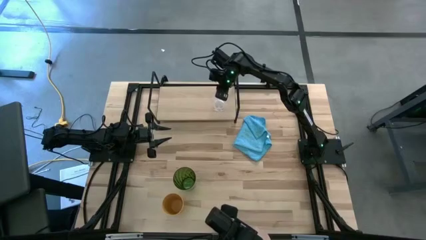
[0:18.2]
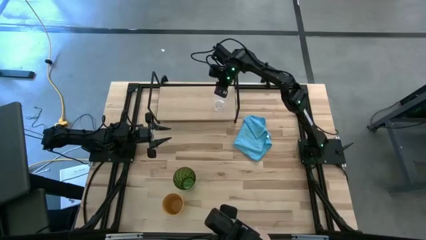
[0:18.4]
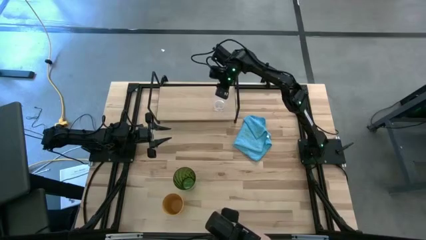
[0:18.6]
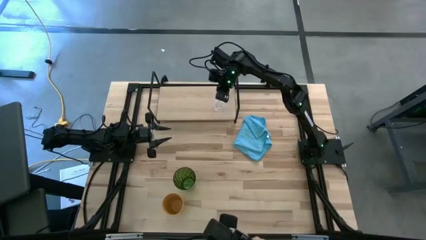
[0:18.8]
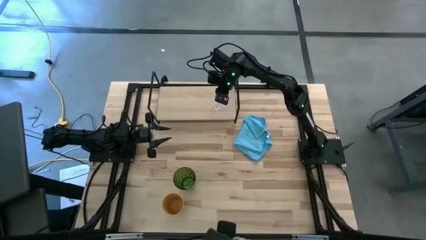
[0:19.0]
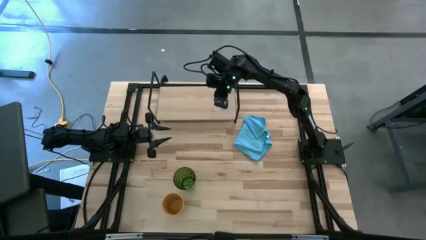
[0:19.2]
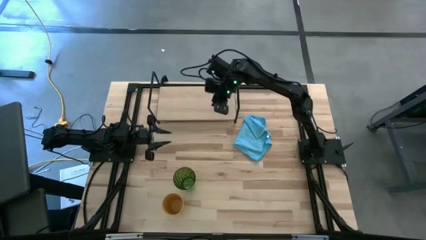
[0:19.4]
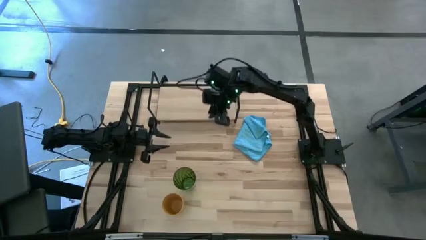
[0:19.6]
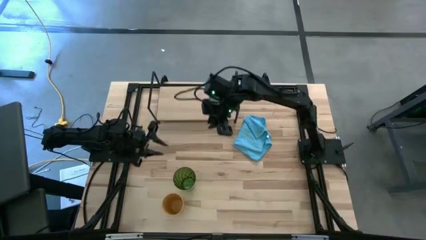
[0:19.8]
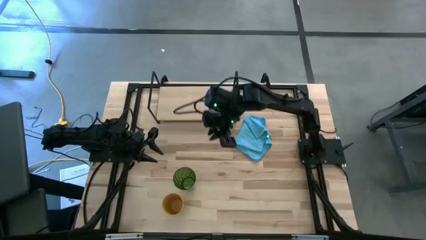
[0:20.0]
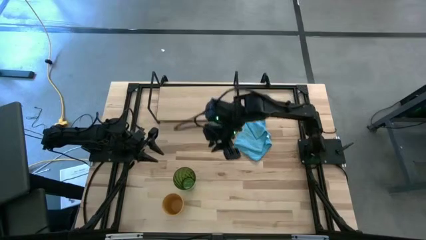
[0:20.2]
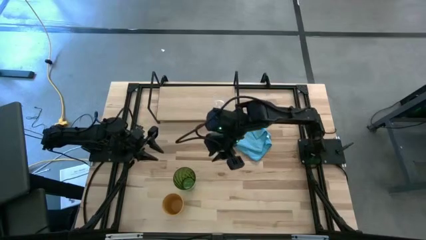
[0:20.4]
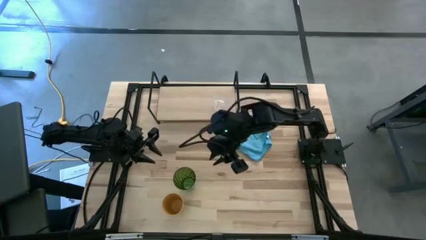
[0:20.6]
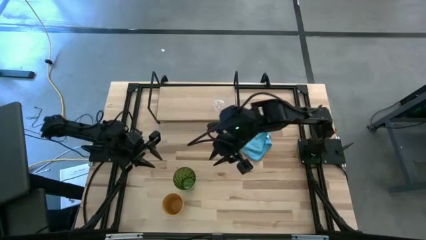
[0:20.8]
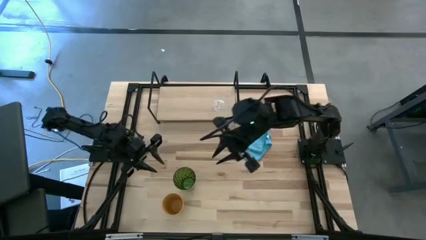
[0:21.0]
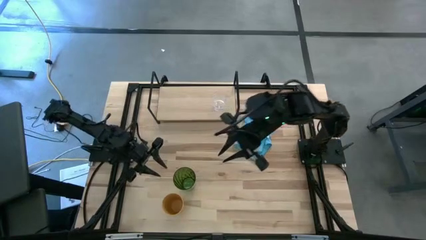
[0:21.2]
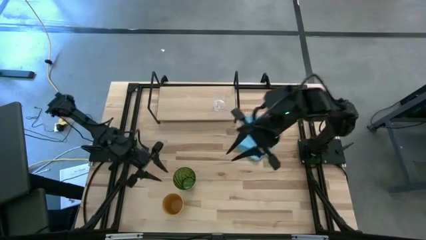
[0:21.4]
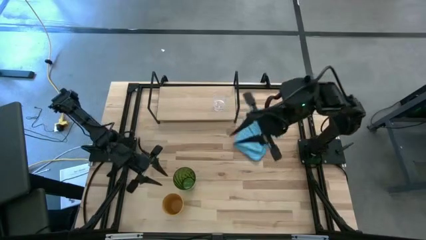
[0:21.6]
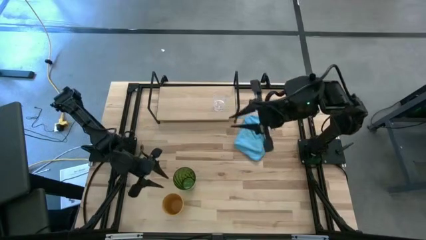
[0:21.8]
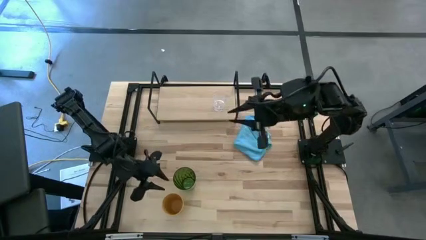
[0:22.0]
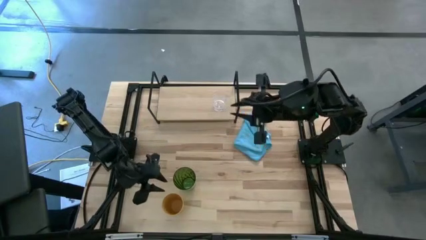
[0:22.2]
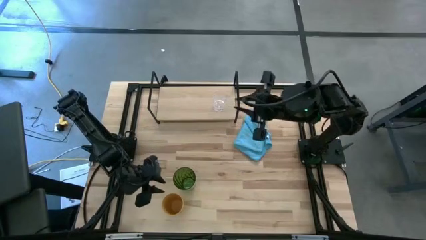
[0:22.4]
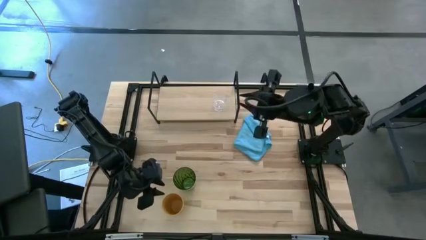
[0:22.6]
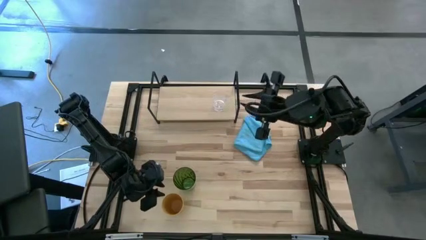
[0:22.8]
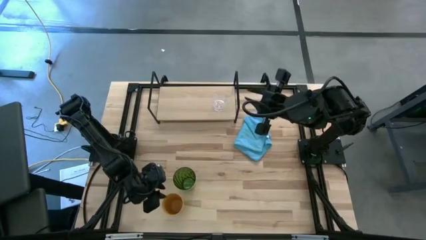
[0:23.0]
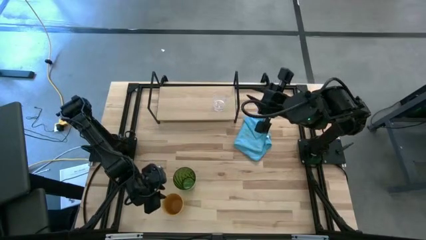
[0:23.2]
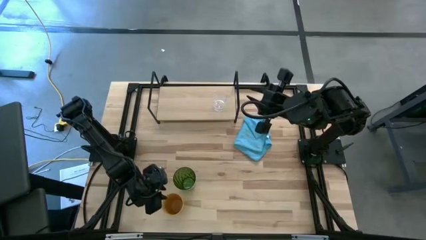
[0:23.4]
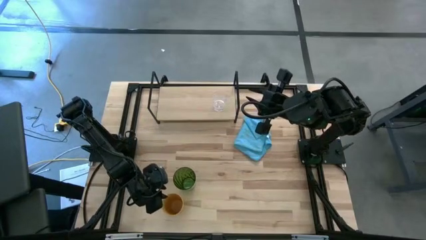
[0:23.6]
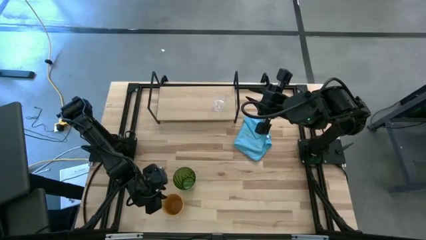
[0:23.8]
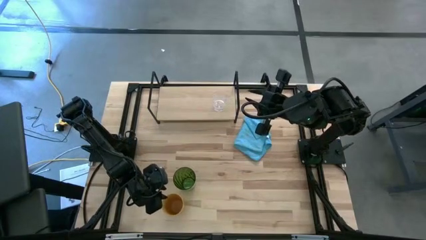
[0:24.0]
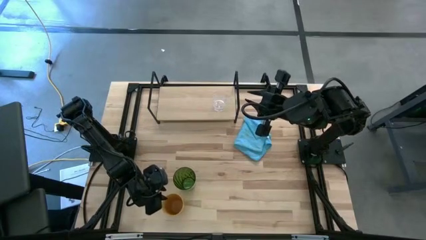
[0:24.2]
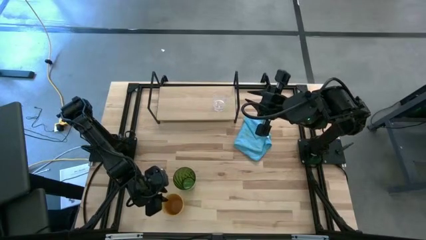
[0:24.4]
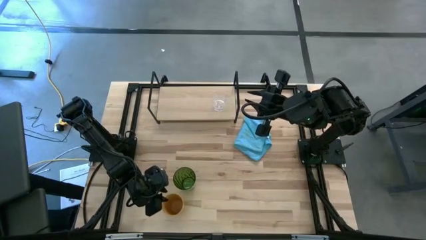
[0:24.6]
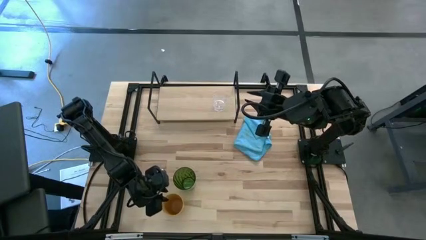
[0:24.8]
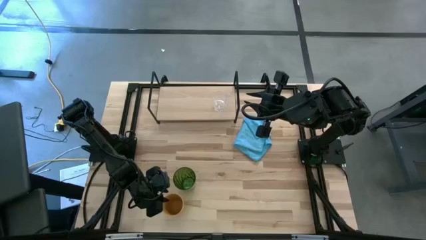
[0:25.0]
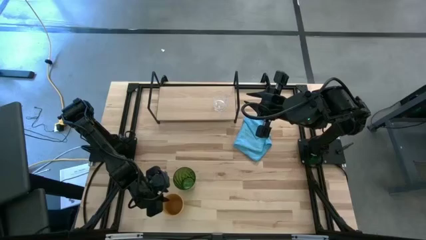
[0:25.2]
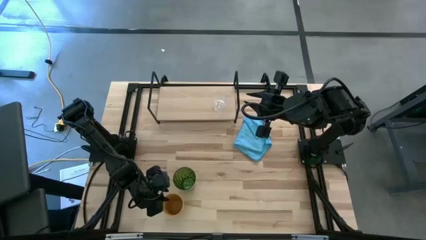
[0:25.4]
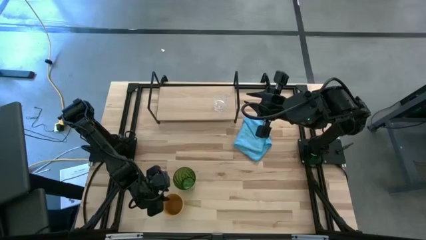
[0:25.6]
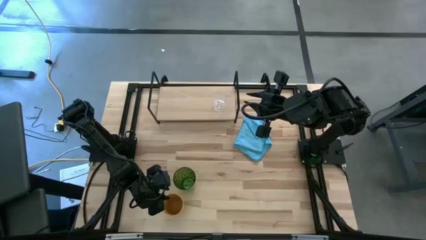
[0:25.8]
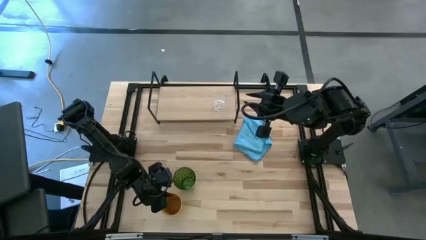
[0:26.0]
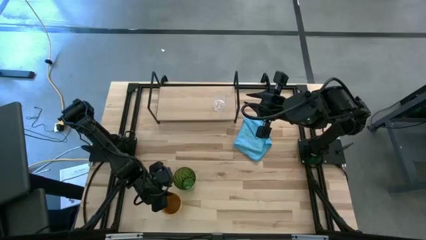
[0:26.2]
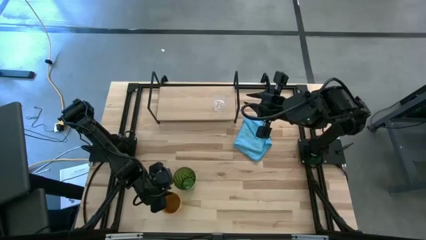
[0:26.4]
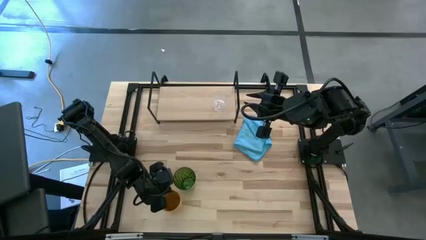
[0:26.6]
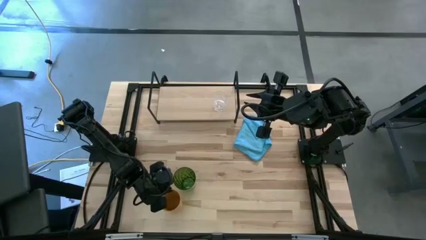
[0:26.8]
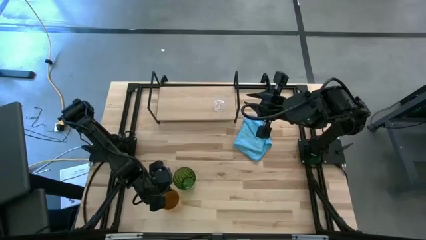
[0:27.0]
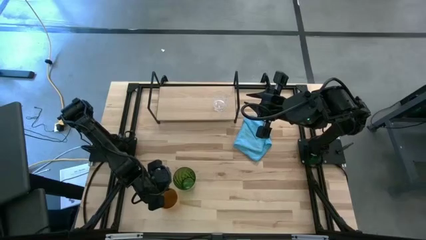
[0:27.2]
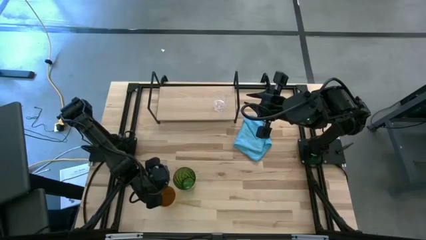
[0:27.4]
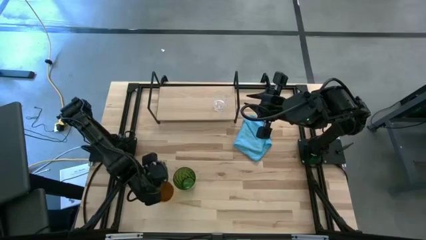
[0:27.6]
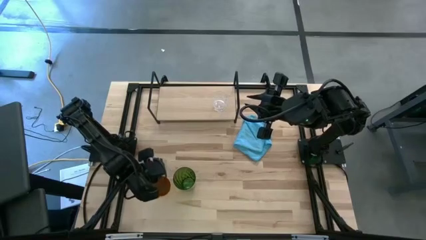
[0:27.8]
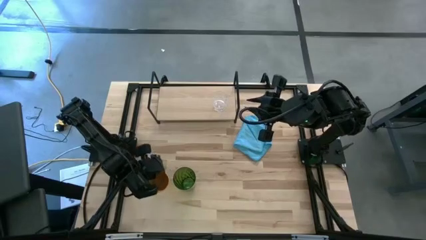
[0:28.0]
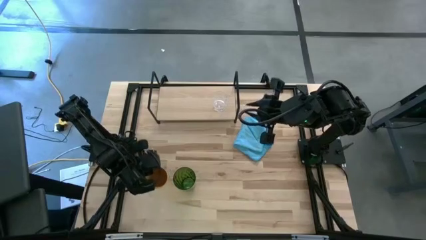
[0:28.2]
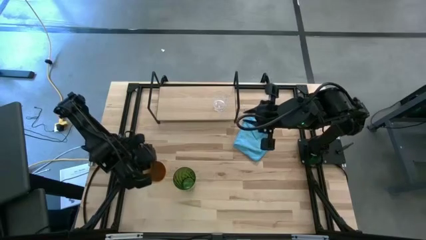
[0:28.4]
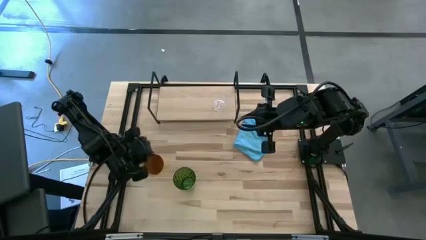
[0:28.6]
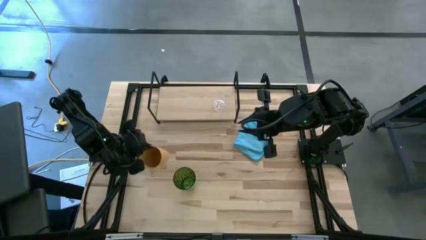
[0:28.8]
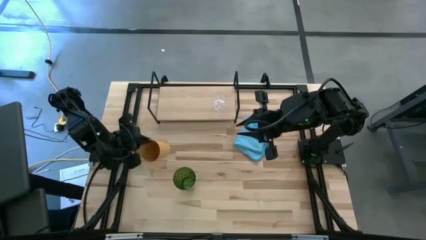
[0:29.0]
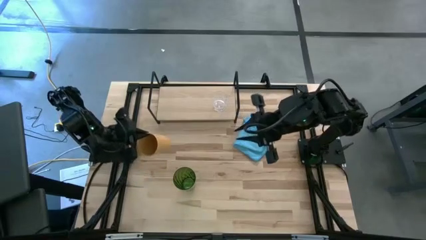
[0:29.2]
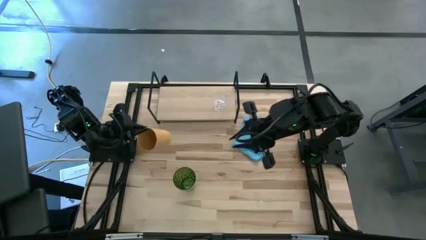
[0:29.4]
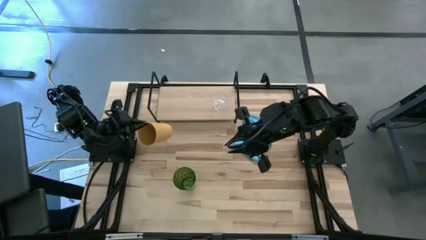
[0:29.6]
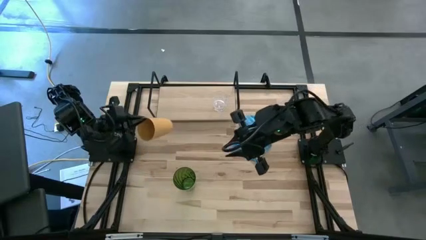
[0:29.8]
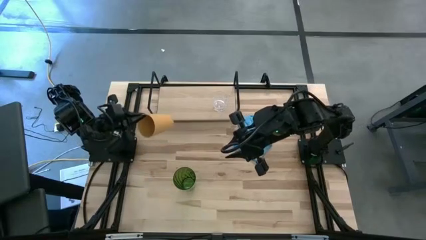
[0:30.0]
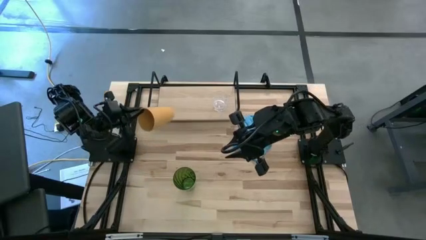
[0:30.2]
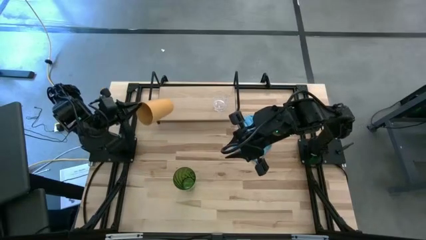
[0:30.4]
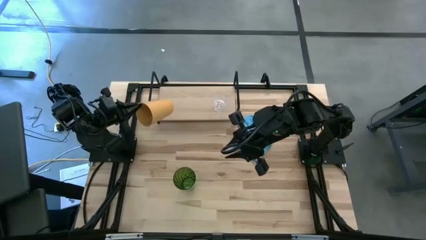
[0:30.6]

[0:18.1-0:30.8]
Task: Stack small to large cups/mugs on shelf
Put the yellow cup on the shelf

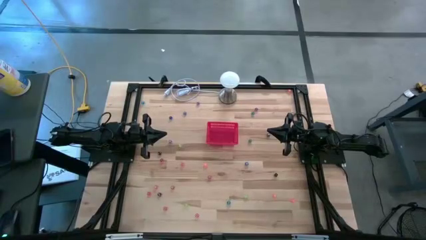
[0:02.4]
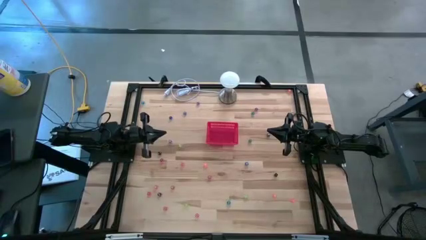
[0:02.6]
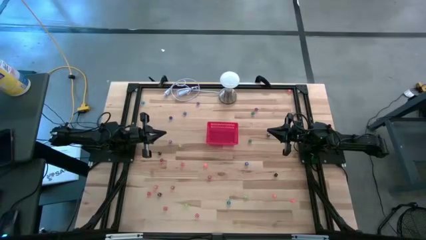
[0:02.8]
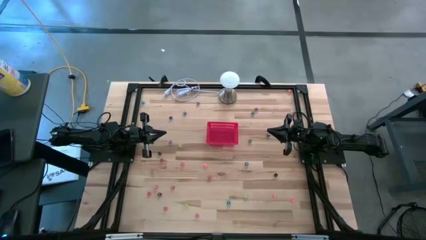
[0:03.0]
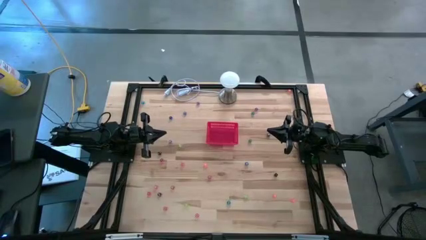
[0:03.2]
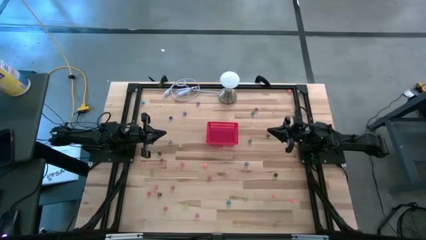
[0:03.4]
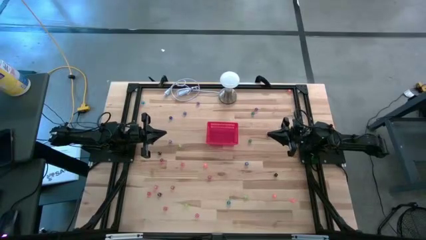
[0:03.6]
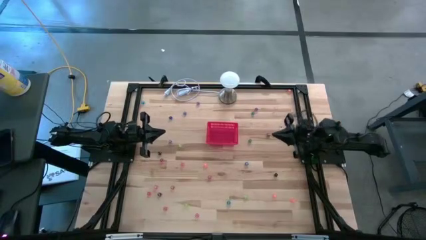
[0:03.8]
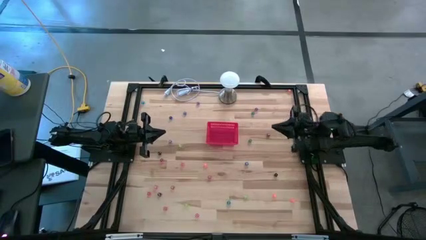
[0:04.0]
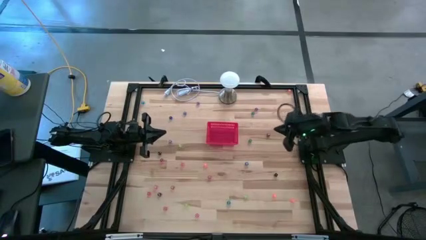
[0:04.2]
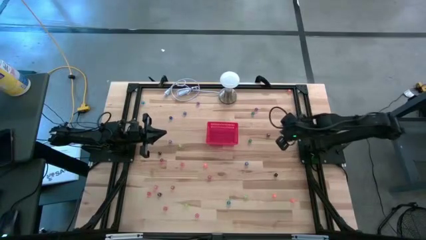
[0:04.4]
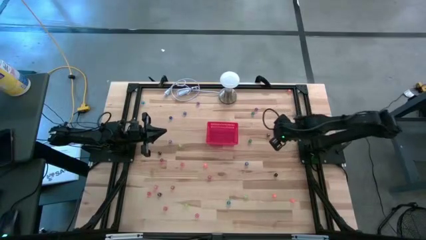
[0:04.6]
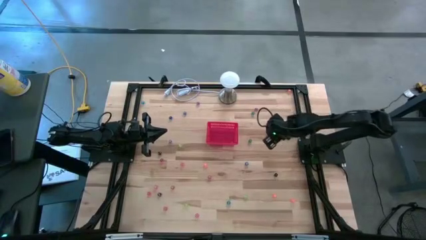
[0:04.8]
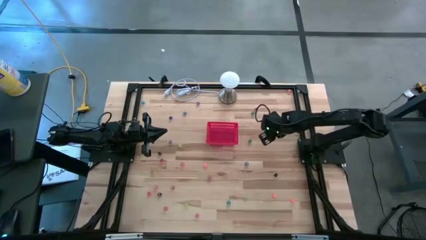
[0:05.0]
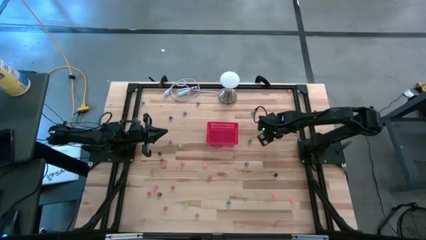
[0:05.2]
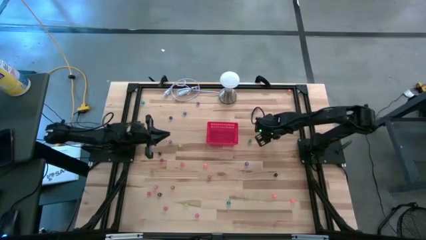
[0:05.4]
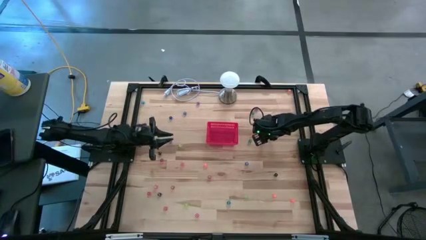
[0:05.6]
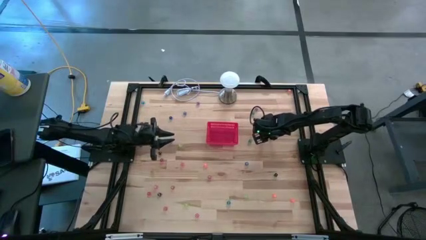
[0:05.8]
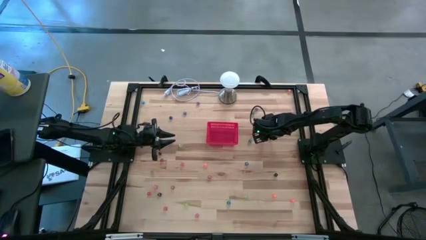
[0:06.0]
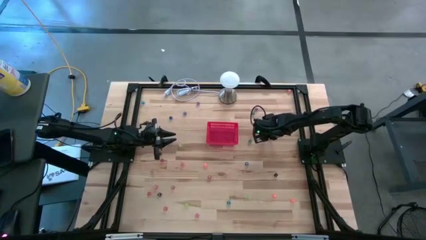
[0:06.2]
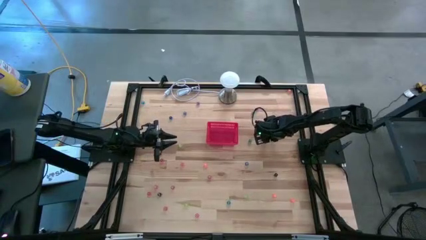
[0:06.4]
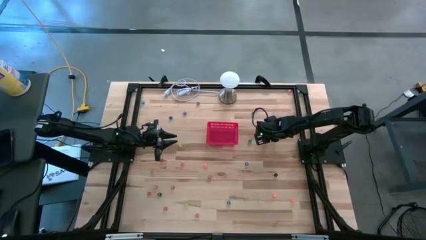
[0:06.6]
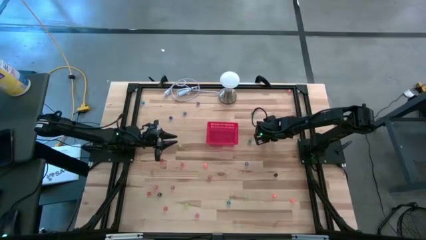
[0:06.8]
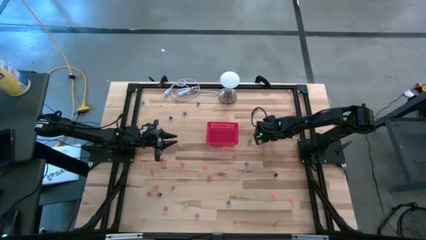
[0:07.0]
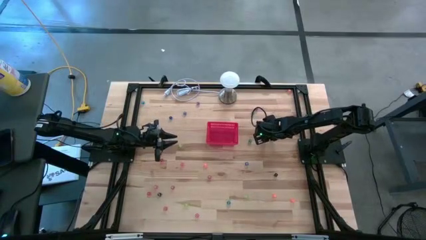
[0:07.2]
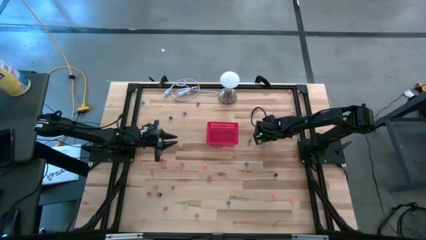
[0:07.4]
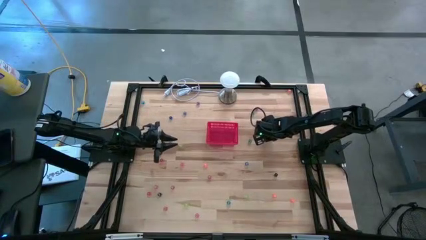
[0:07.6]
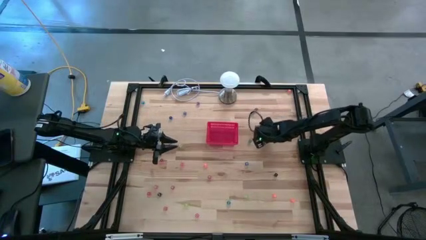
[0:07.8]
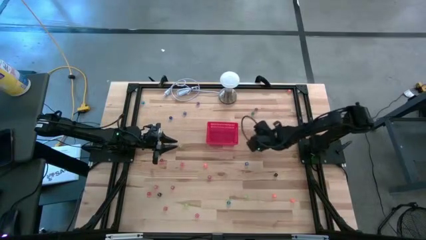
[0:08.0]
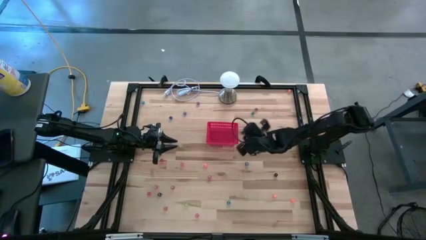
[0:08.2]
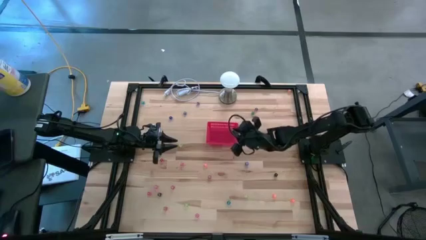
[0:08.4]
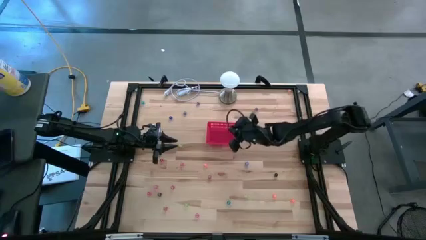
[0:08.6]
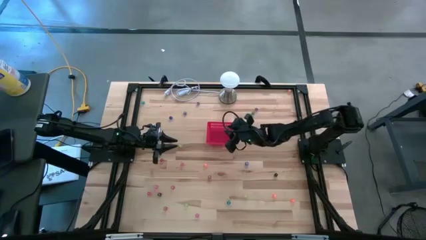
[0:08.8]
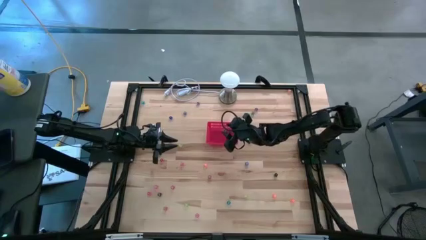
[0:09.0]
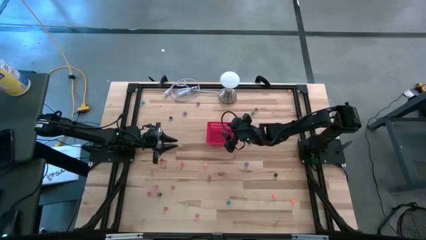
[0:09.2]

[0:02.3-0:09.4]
Task: Pick & Place Dice
Put the black dice into the bin
